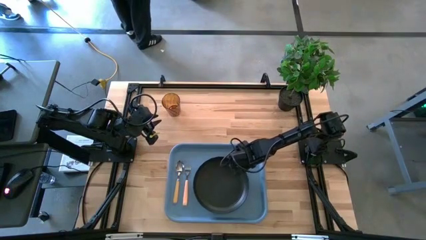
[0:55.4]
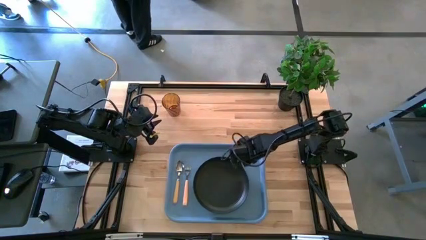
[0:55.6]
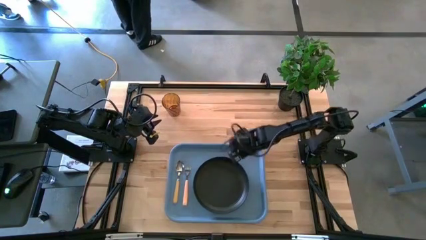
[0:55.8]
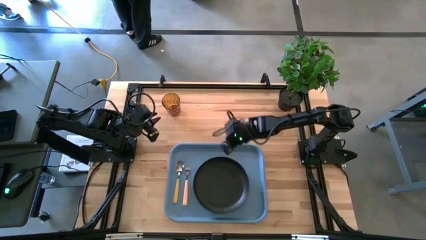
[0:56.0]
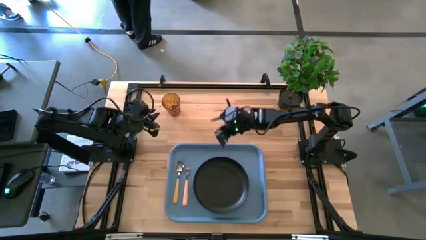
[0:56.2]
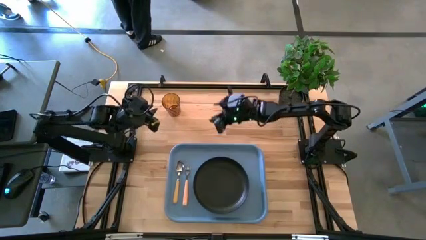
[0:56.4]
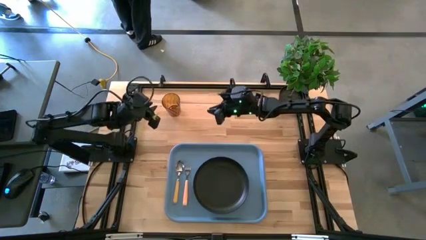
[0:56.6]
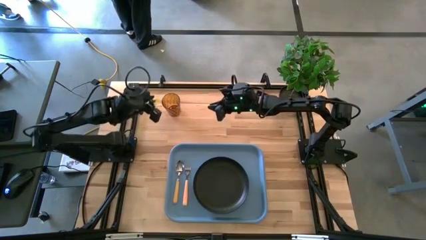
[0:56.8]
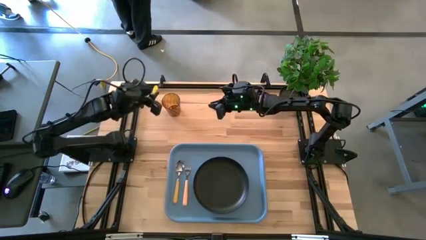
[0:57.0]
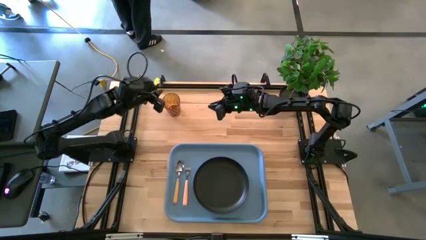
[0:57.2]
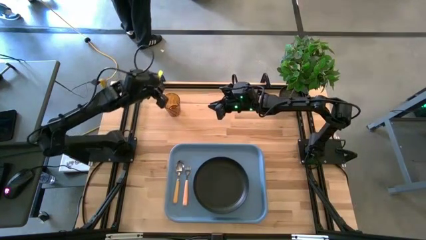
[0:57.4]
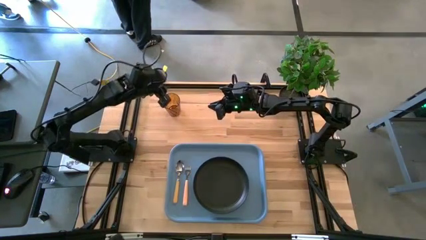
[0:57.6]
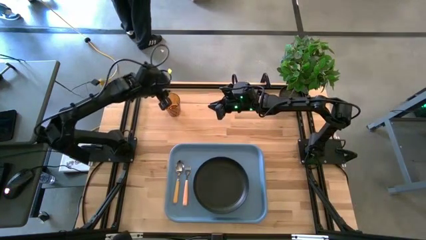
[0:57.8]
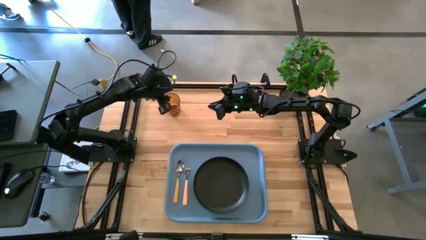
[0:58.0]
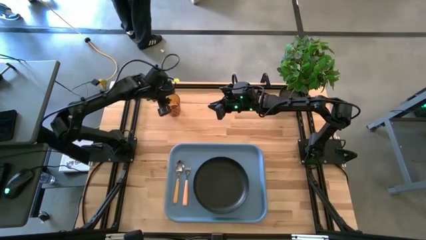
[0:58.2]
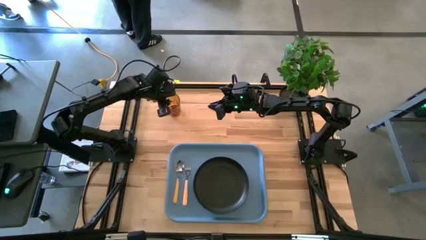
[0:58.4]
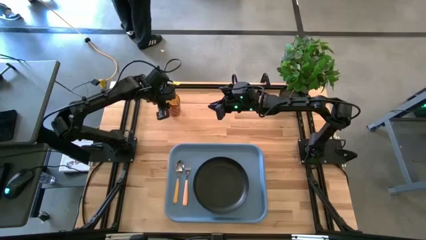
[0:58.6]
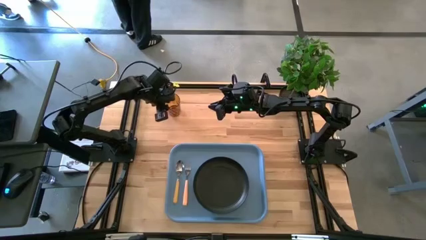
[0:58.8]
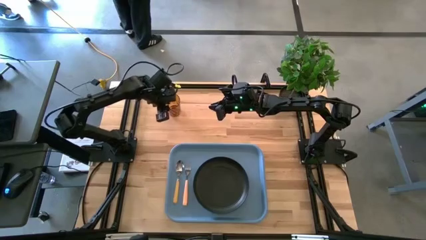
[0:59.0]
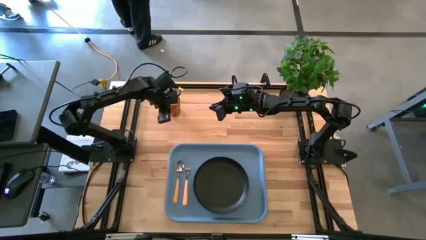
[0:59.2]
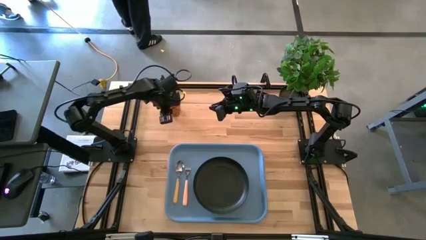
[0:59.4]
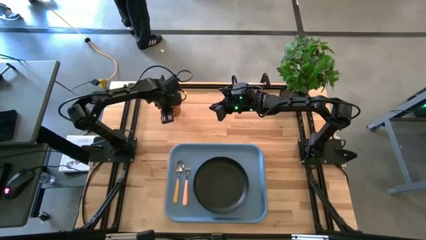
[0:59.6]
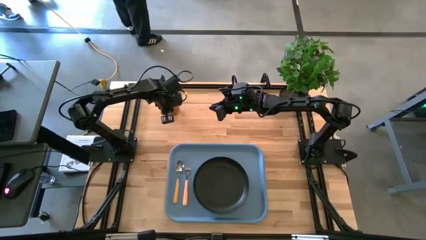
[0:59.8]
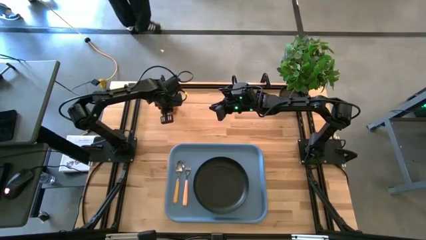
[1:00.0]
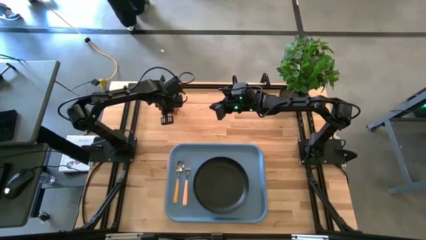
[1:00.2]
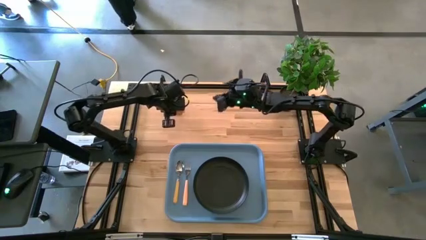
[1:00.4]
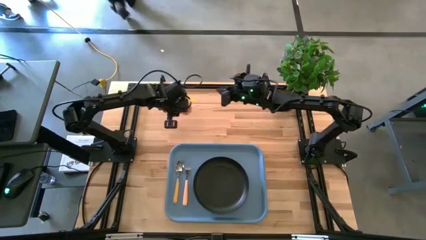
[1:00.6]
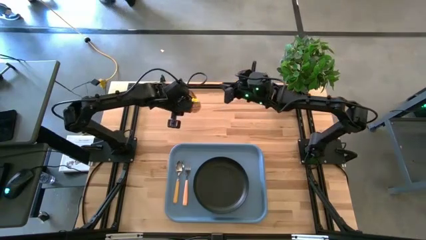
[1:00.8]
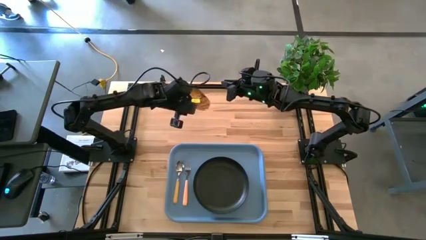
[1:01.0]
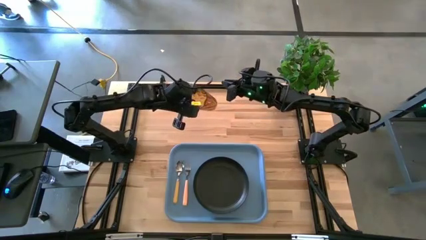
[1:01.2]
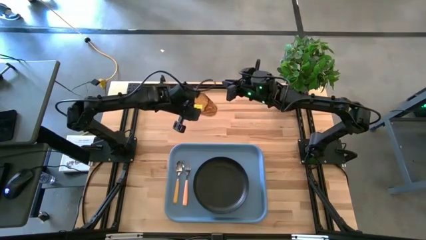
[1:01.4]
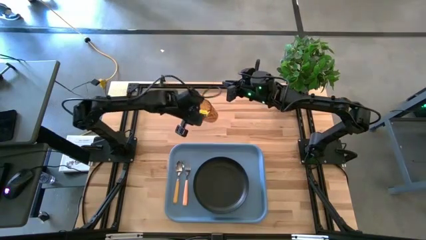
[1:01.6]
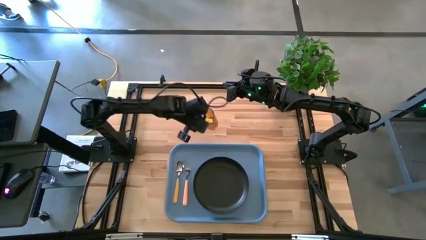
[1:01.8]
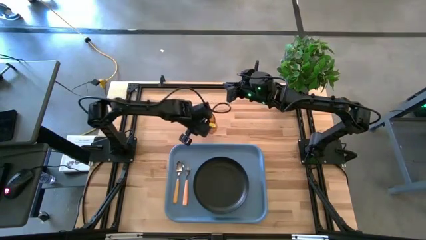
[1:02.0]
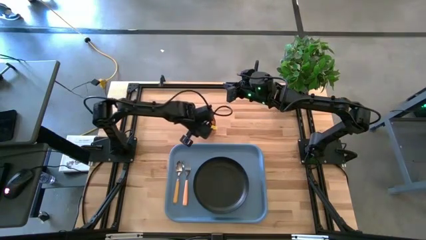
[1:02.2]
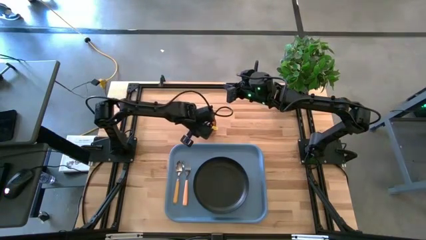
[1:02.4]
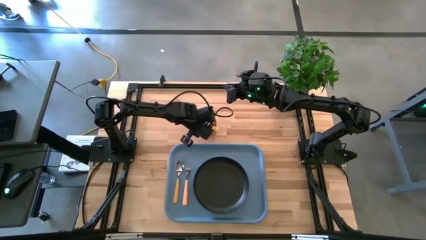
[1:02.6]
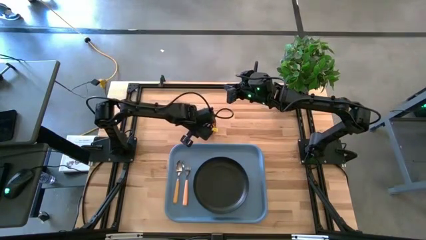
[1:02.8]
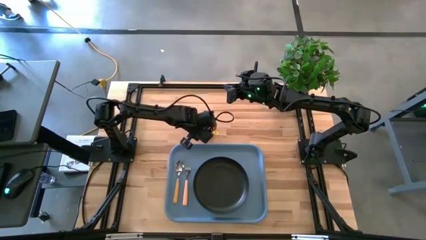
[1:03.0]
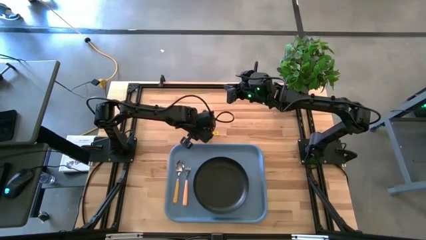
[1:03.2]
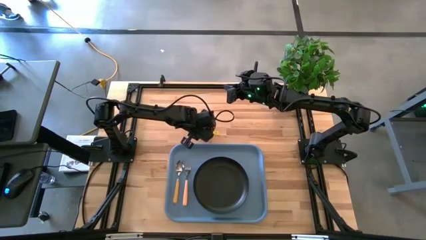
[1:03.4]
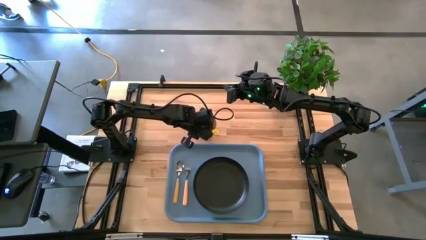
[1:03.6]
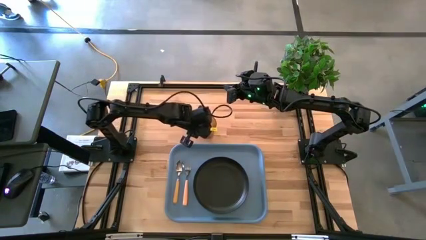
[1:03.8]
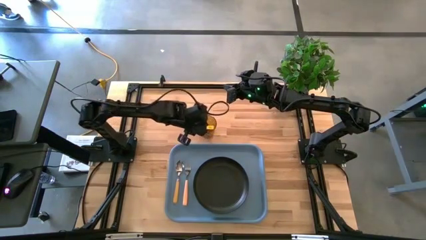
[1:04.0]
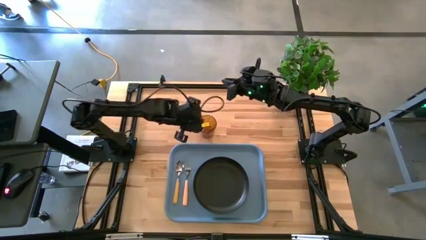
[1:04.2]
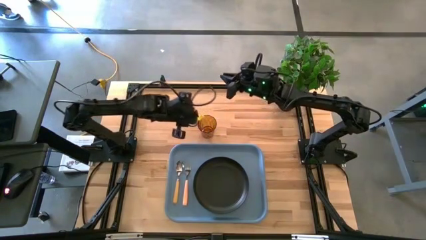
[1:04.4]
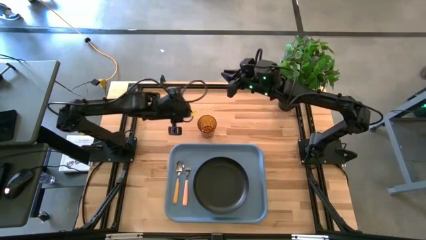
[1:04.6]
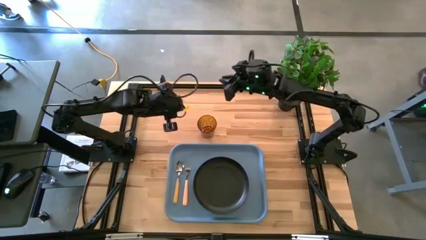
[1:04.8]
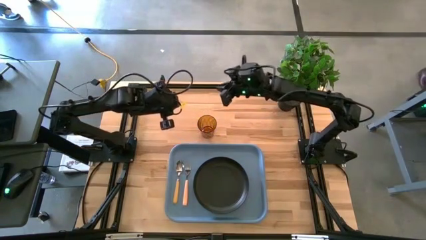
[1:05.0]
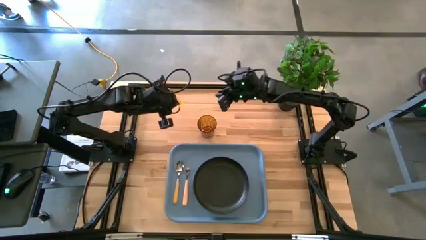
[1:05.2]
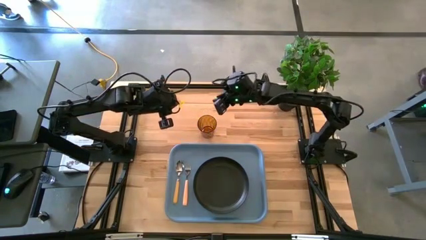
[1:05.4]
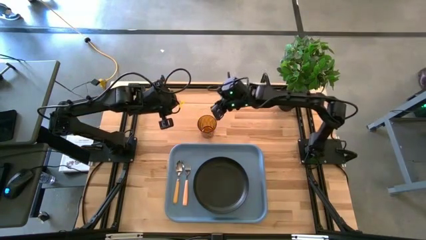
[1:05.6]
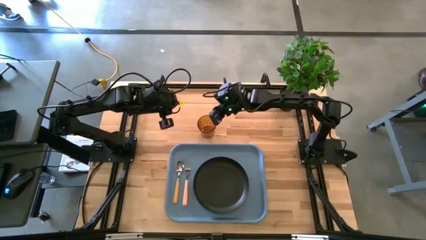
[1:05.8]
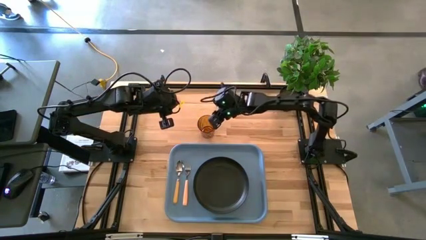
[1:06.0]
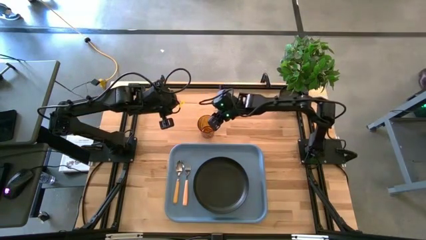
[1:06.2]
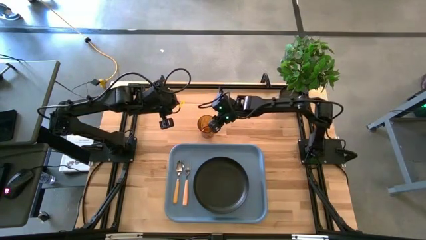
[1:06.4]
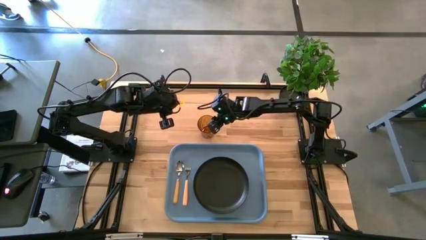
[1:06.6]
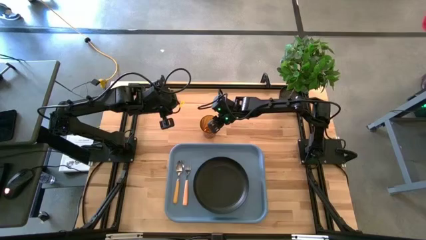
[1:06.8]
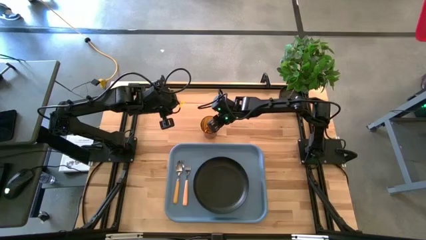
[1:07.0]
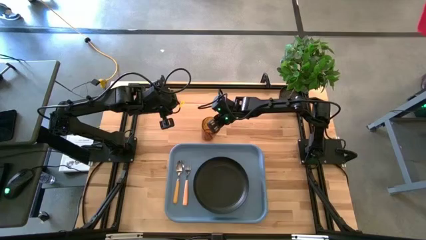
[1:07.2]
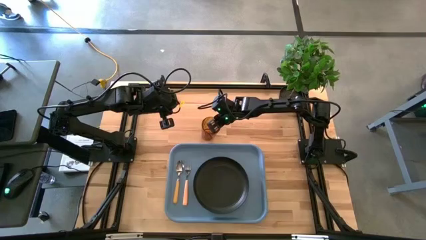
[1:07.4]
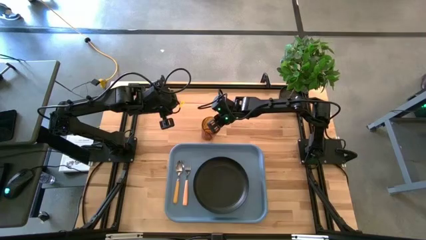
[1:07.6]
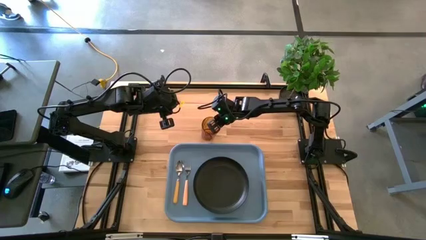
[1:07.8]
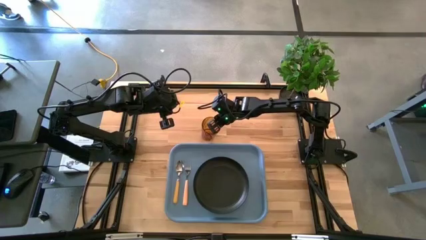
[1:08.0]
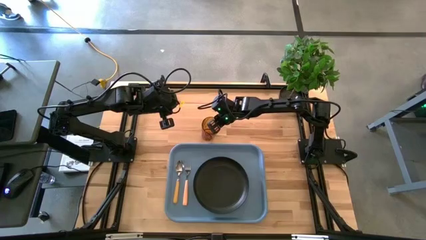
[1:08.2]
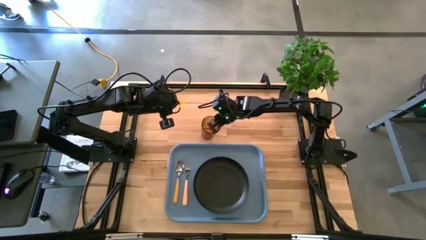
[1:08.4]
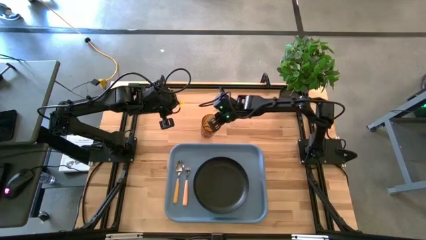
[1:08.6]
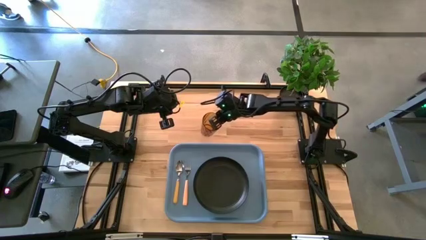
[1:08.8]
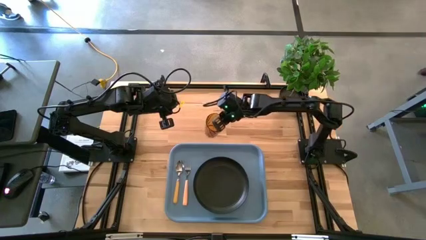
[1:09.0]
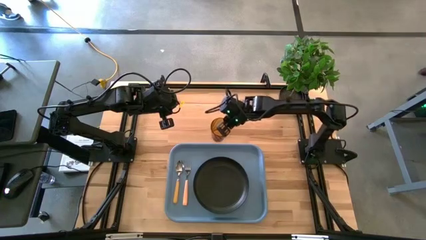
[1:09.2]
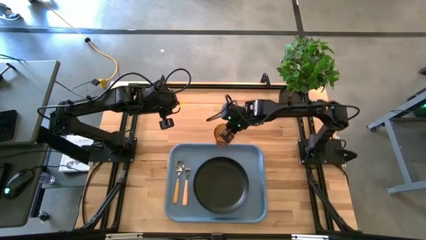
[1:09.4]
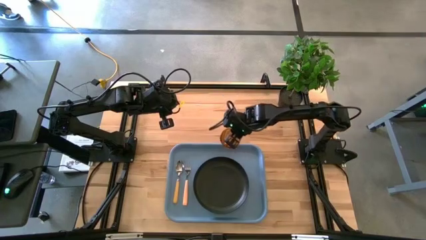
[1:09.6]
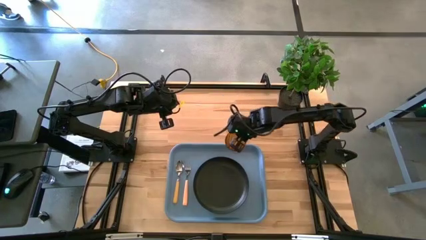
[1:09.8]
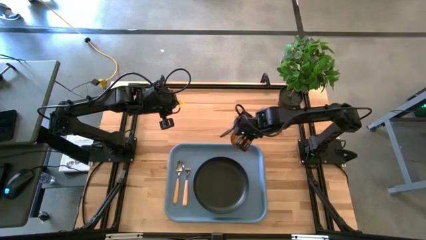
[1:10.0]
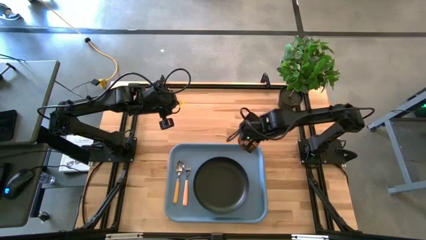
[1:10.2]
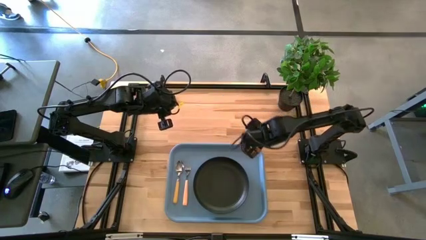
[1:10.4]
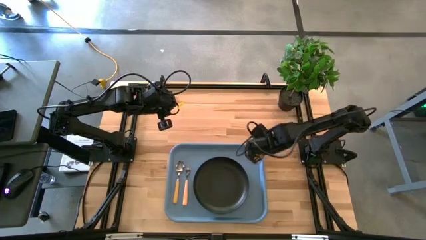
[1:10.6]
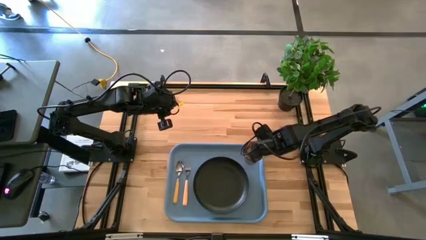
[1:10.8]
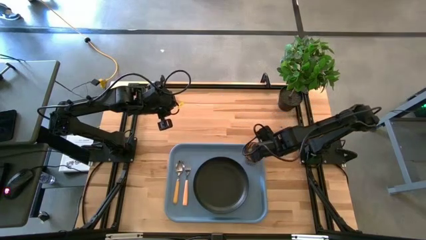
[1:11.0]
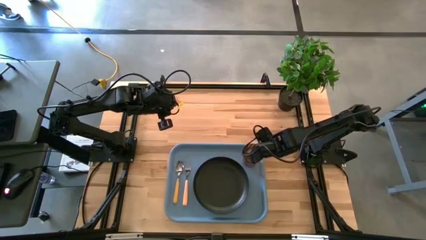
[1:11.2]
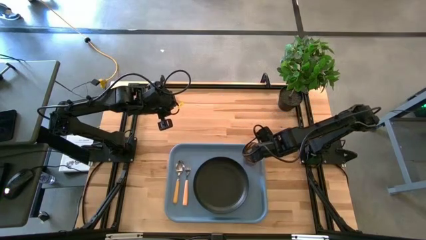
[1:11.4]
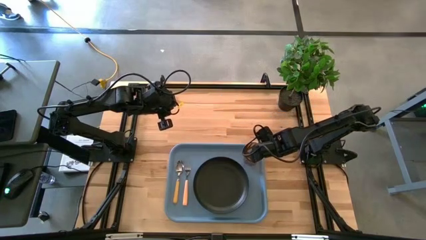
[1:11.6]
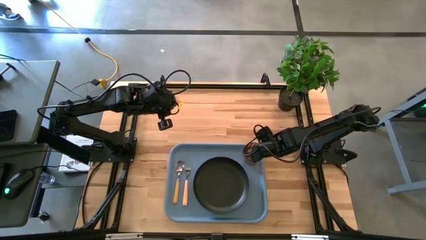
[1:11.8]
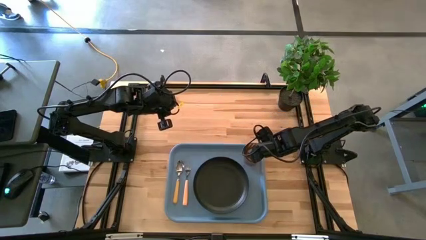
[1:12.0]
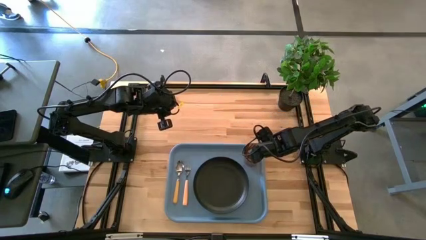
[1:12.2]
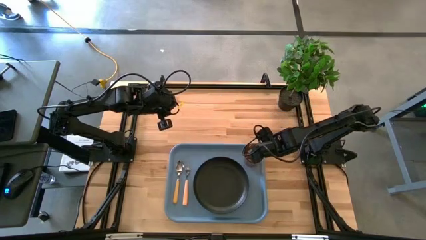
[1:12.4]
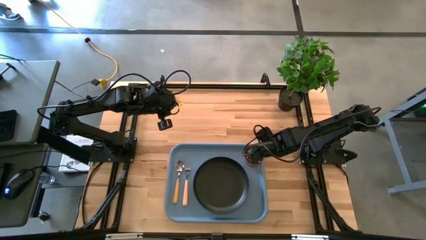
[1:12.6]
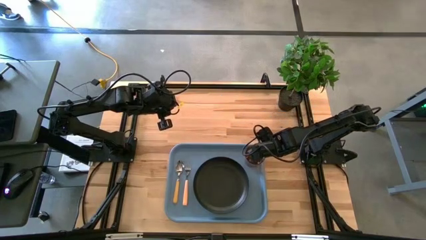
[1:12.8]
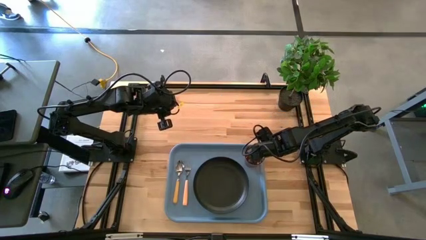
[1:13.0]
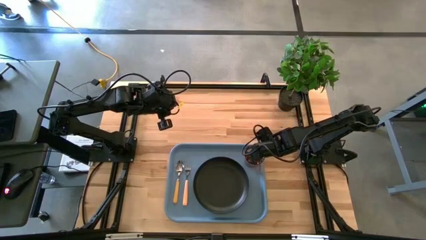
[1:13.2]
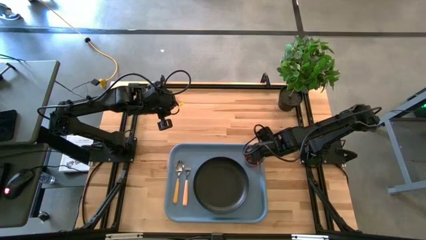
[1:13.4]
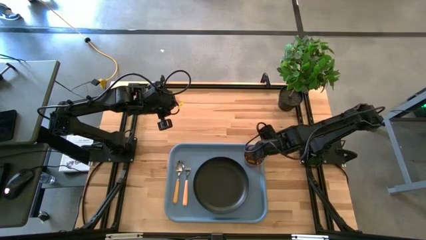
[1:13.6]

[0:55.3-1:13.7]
Task: Pick and place plate/cup/fork/spoon on tray
Put the brown cup on the blue serving tray to the top right of the black plate
